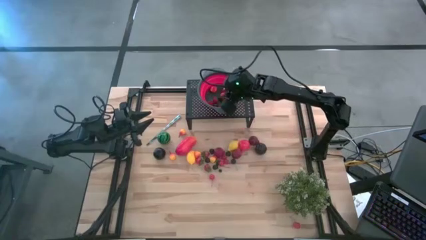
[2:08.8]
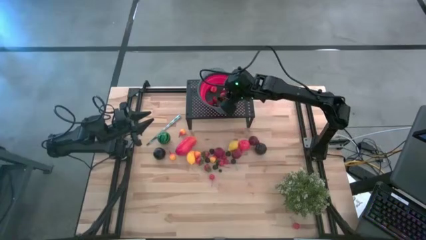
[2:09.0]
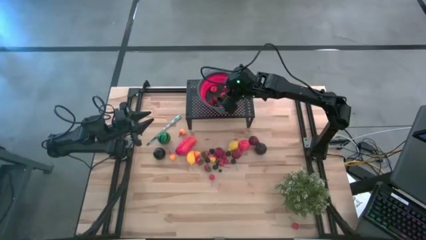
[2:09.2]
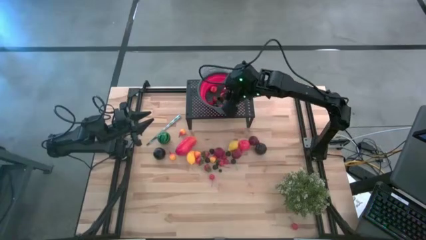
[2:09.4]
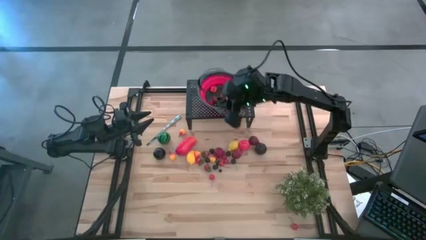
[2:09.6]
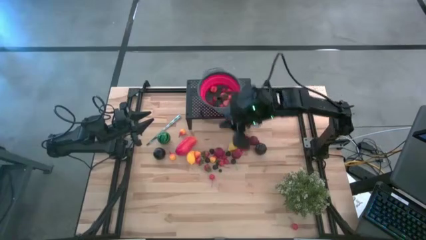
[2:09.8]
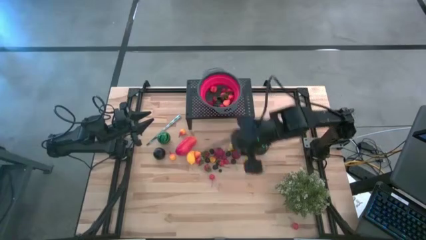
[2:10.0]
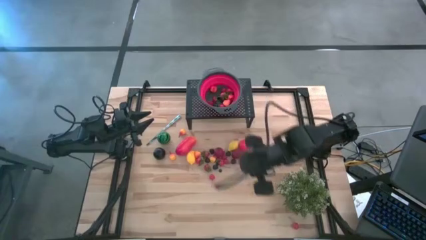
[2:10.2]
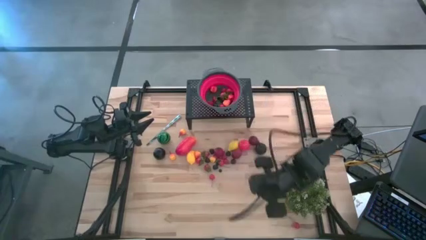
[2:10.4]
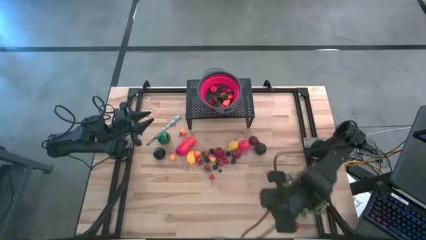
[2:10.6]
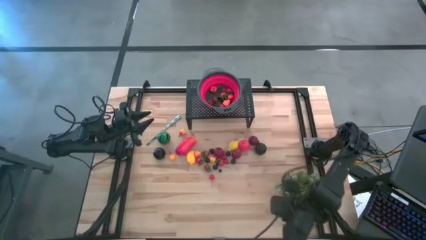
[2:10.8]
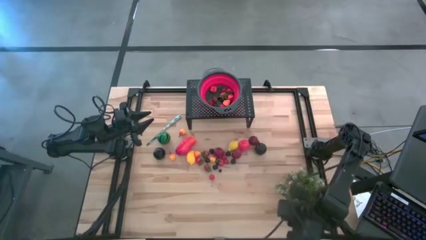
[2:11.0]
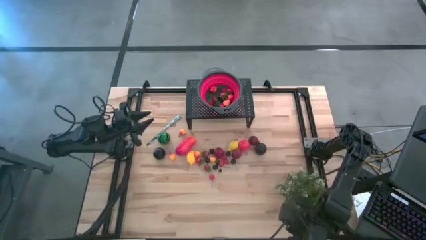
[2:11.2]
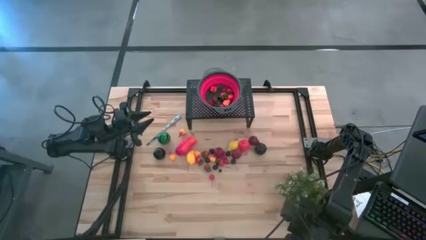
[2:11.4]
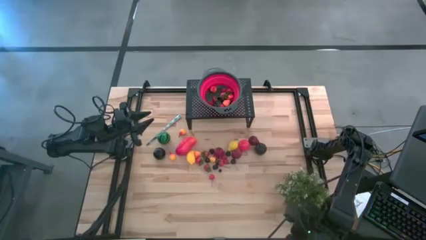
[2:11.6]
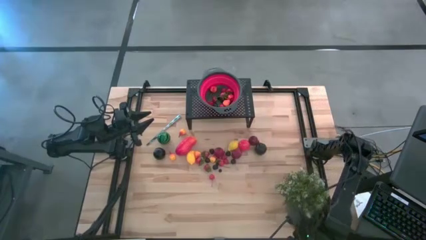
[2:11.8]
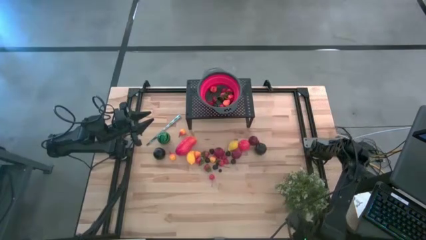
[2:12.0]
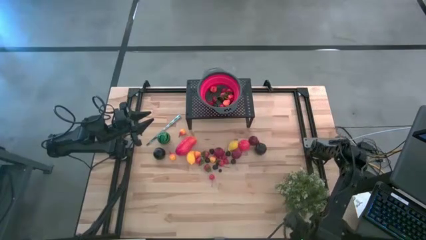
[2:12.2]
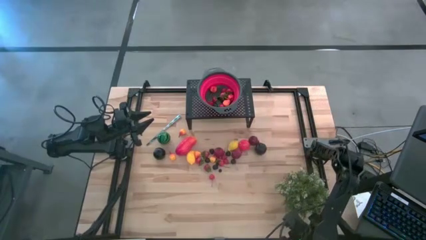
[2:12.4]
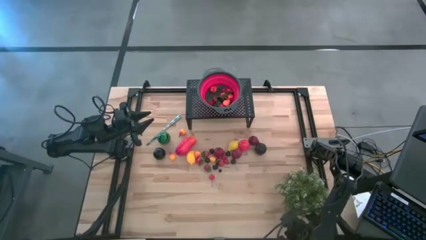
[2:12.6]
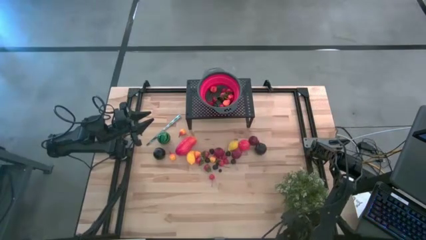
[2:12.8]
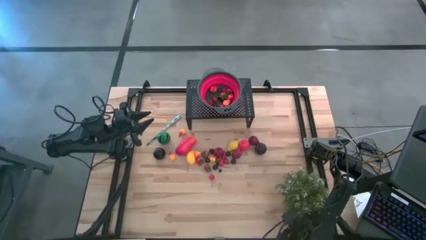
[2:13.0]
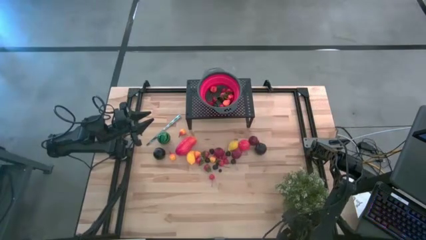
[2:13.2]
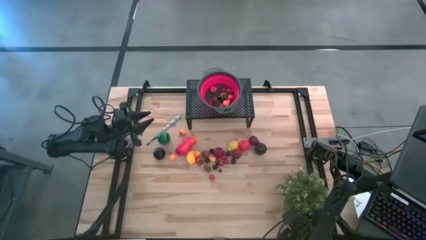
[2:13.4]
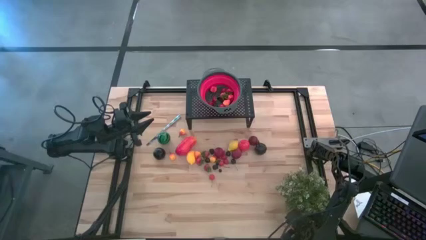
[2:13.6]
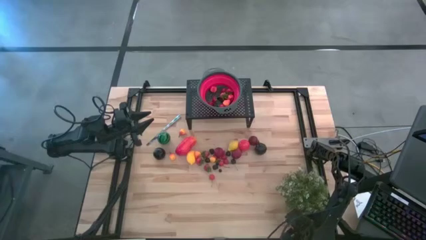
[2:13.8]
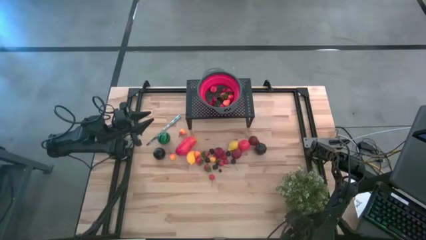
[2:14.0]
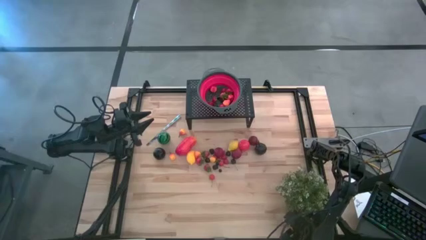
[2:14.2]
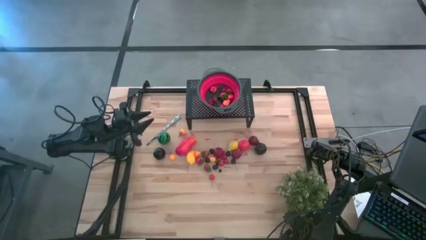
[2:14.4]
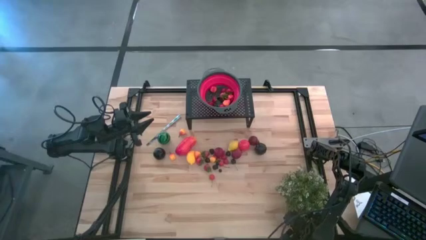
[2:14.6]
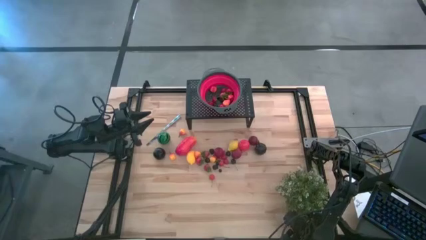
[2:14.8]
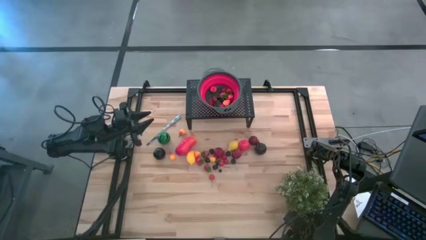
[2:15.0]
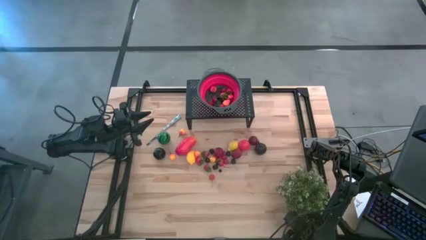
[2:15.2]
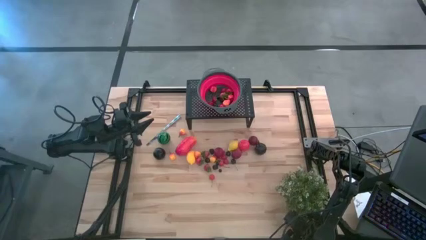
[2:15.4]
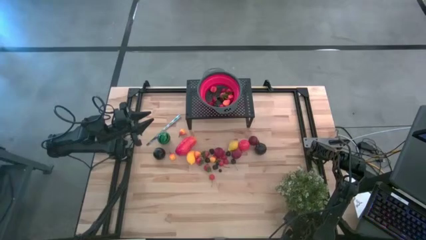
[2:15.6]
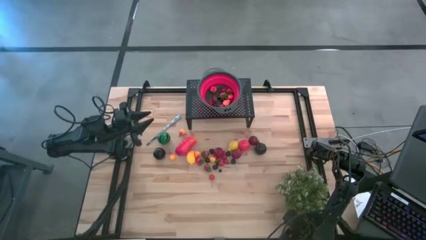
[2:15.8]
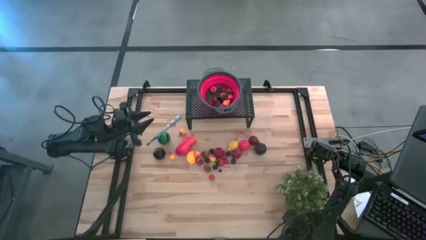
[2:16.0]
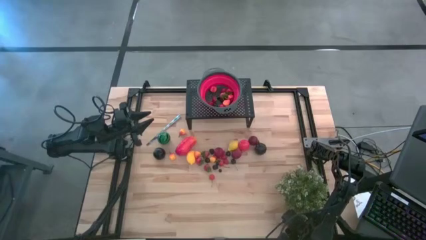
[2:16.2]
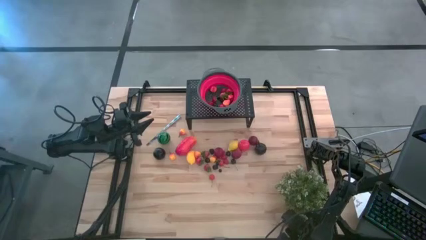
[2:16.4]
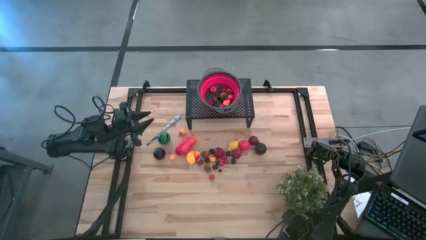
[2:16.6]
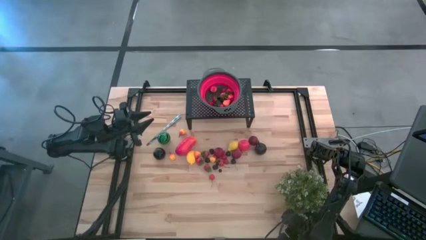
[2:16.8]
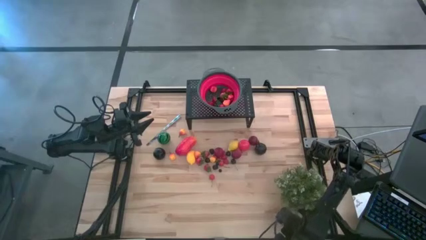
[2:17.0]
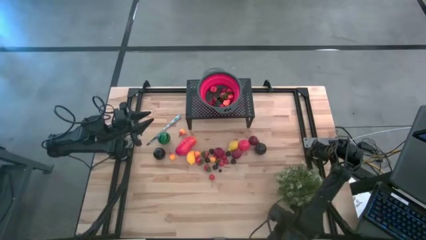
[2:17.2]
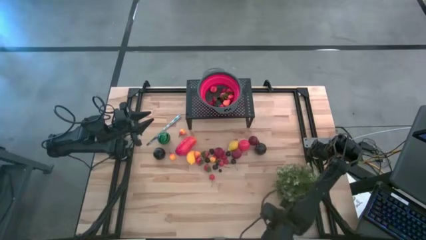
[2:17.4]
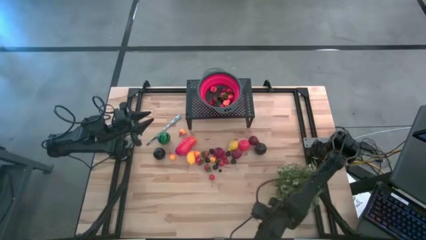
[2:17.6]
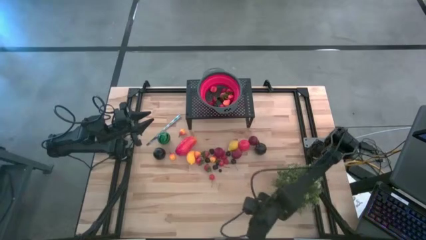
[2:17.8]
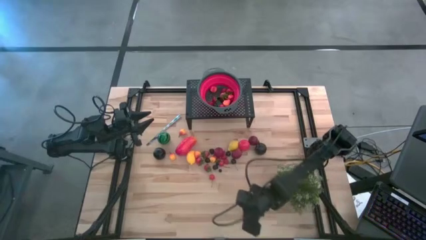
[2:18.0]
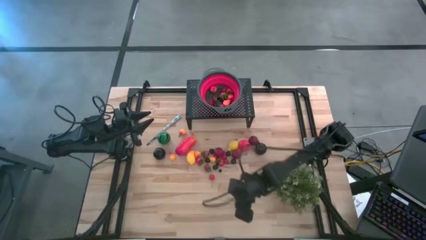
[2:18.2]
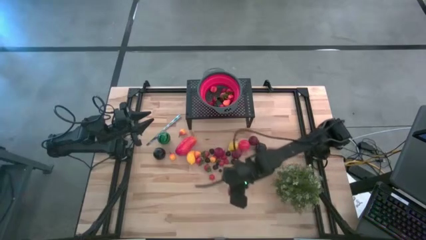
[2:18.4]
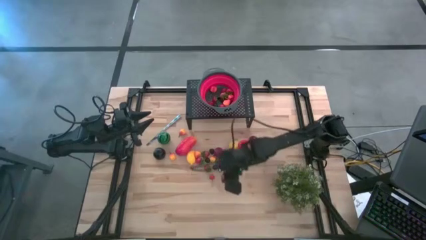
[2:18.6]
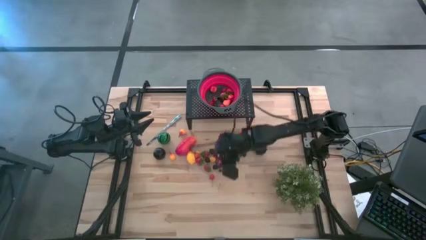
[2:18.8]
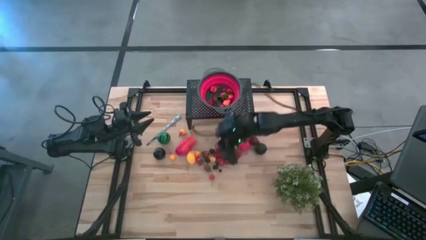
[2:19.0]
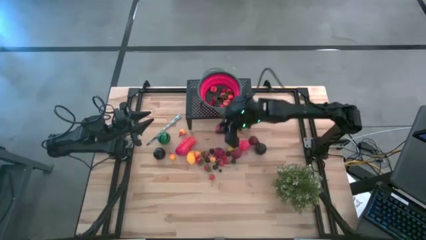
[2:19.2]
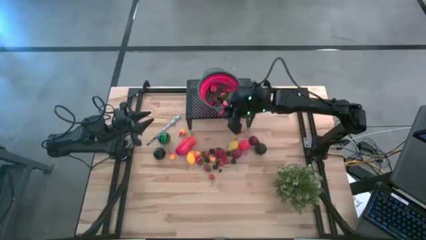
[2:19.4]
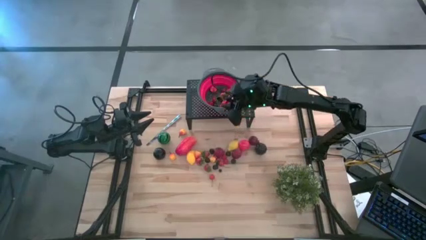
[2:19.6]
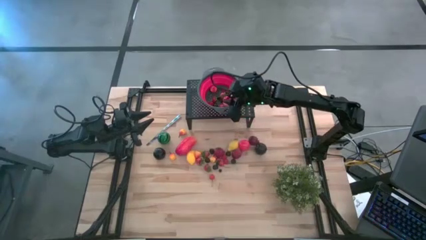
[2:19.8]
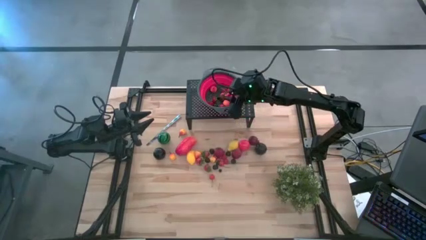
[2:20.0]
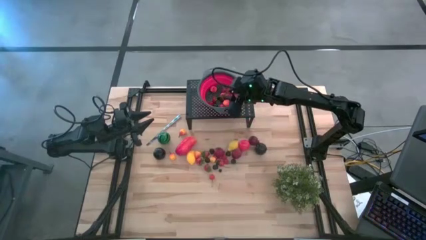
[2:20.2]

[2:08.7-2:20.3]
Task: Pick & Place Fruit
Put the red cherry in the red colander on the shelf

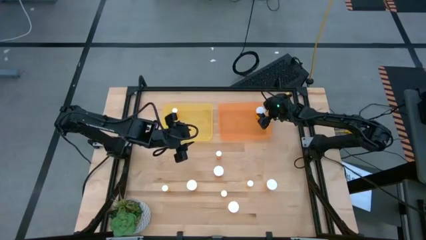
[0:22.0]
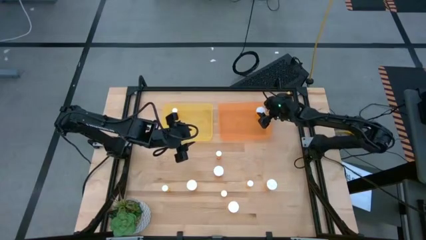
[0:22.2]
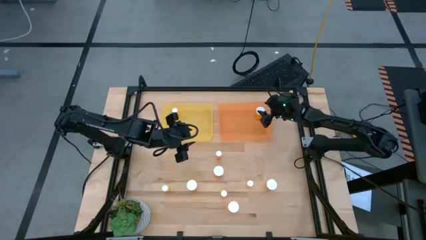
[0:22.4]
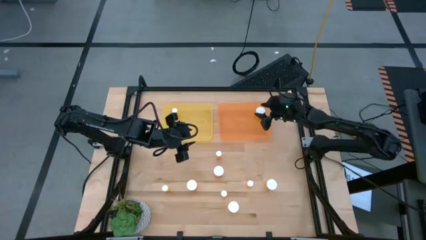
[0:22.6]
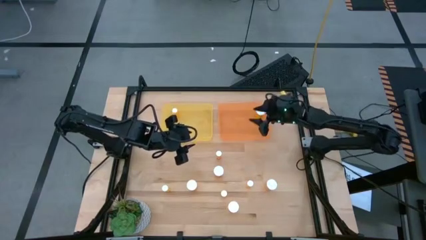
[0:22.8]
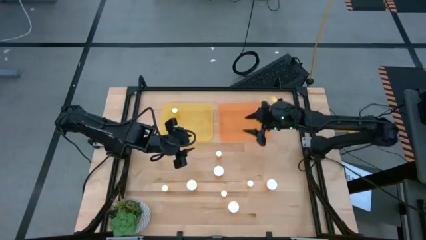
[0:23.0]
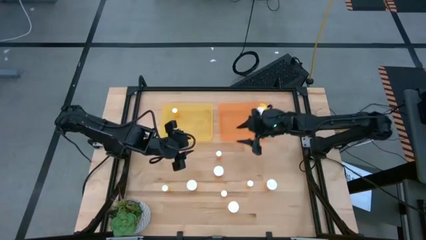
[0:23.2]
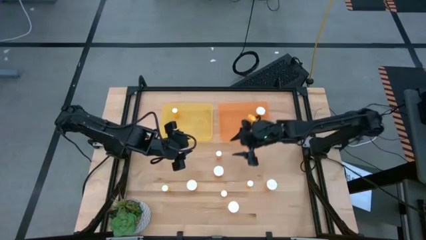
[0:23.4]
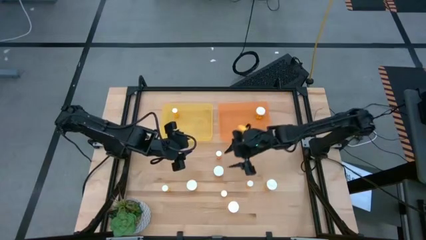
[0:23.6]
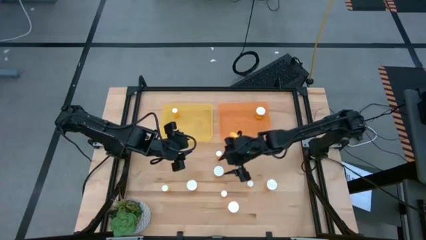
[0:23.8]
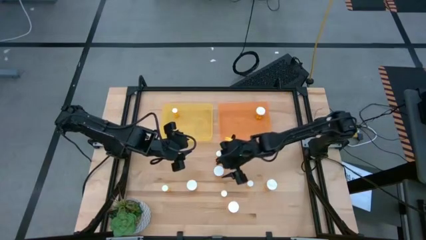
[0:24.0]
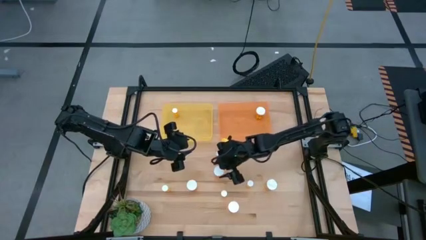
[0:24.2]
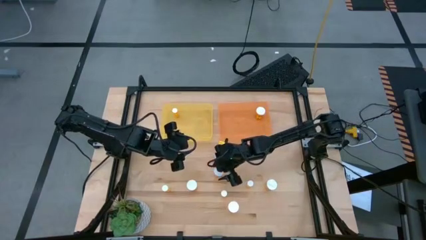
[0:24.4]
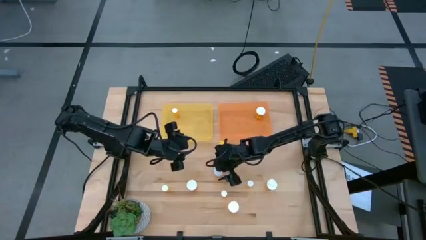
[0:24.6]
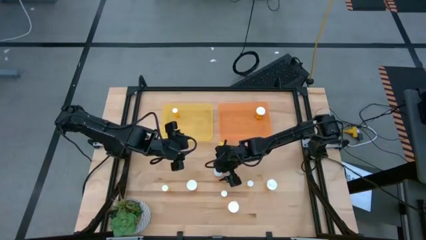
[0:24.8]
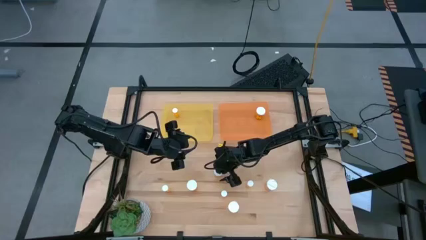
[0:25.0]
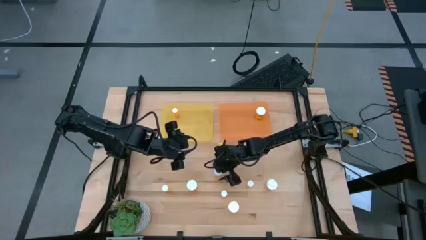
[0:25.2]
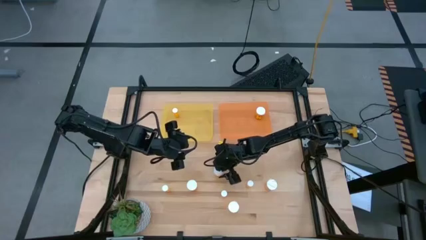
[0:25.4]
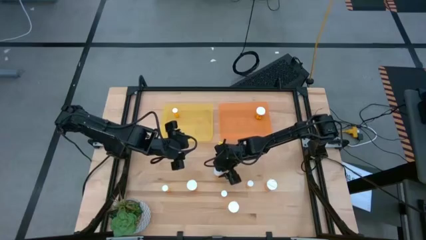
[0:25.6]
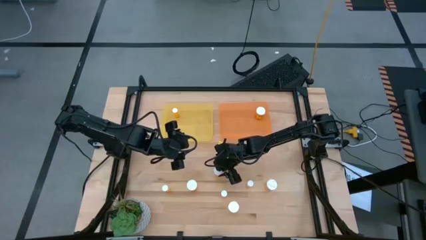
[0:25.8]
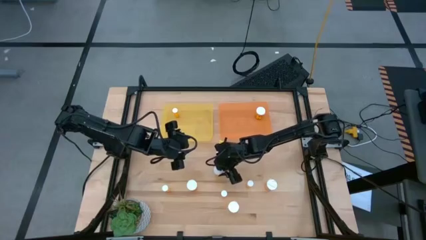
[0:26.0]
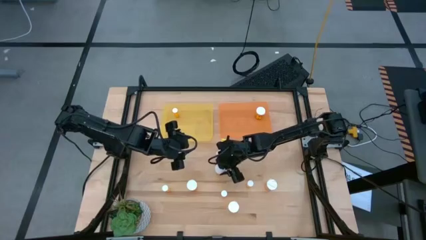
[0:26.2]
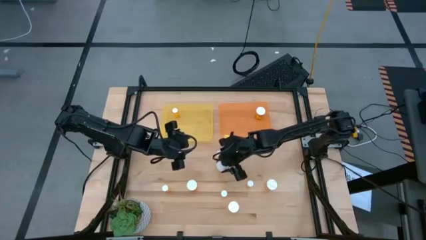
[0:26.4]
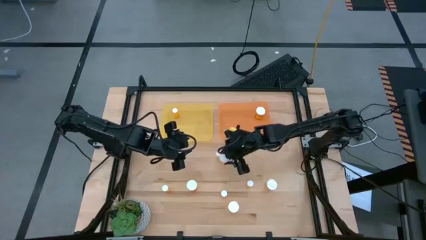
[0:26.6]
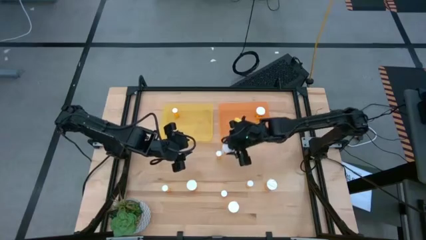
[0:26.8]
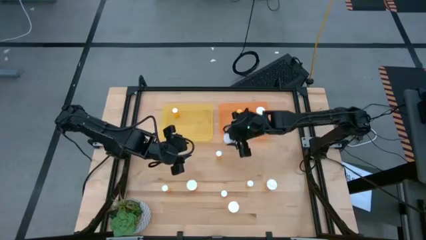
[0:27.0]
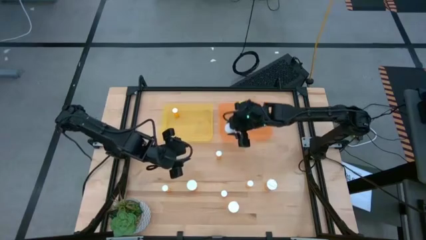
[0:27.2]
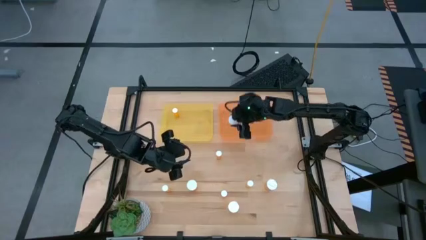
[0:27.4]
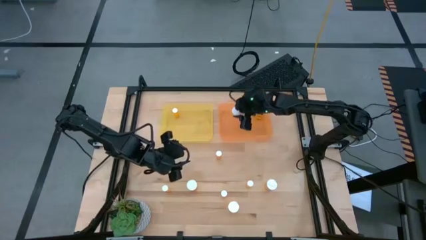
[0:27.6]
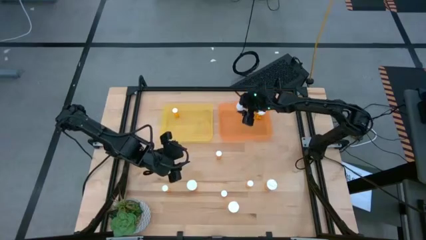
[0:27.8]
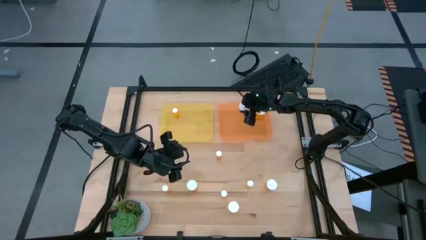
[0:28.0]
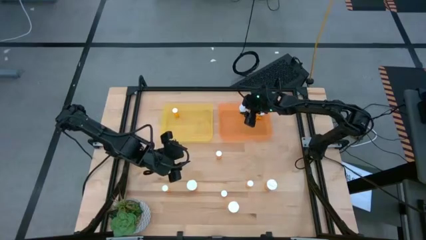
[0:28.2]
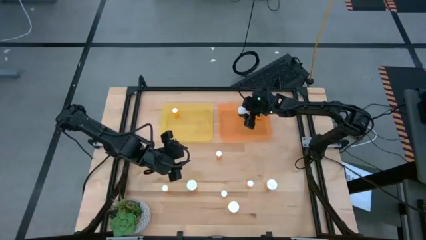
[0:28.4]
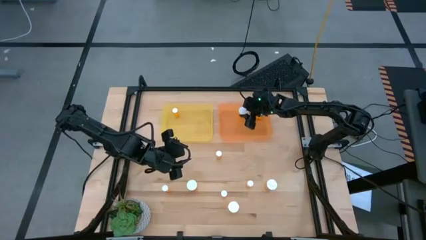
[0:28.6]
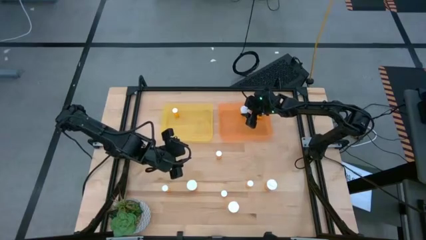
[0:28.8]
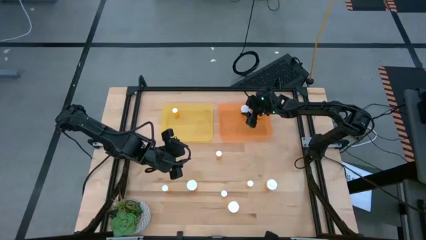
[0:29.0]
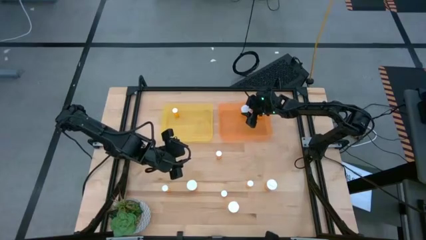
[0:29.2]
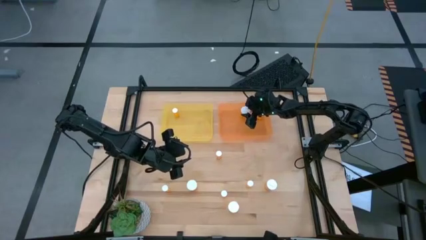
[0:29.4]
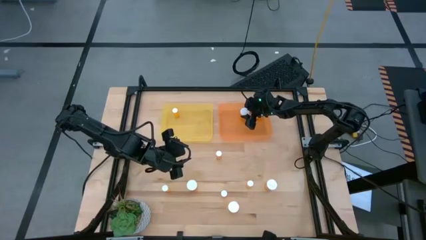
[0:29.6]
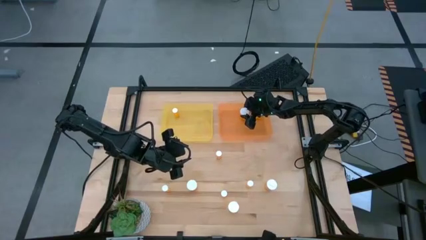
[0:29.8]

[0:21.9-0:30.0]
Task: Pick and place medicine bottles into bin by pill shape (circle, oval)
Put the big orange pill bottle into the orange bin
